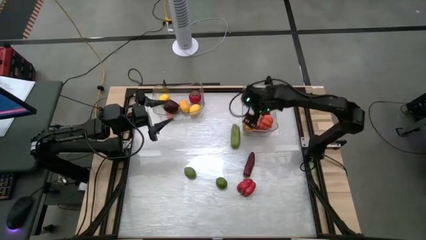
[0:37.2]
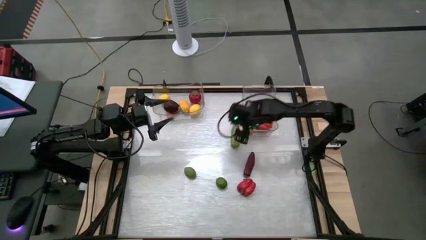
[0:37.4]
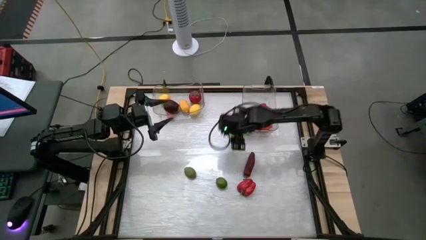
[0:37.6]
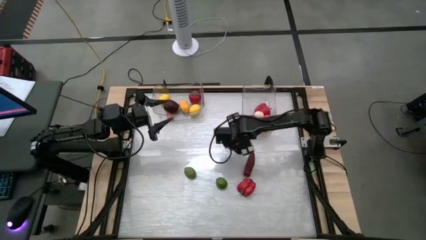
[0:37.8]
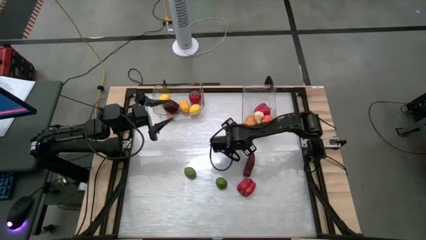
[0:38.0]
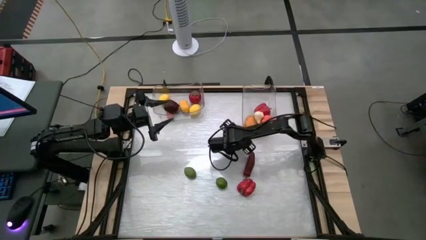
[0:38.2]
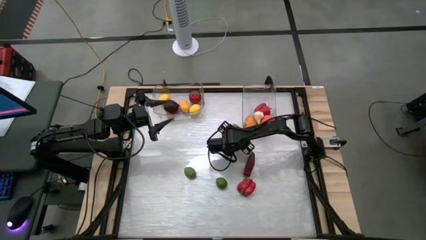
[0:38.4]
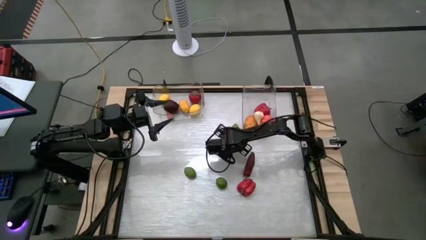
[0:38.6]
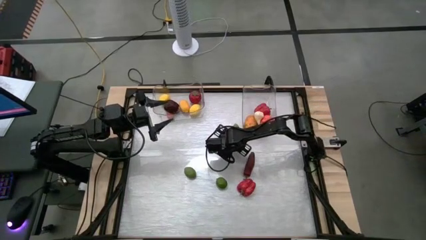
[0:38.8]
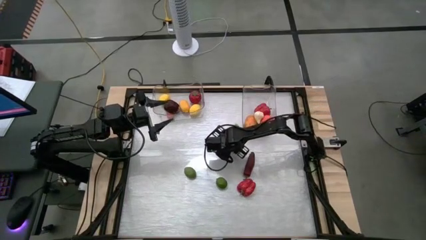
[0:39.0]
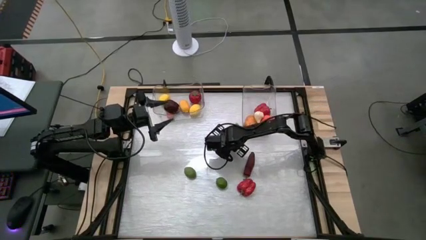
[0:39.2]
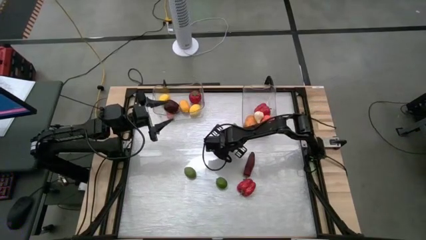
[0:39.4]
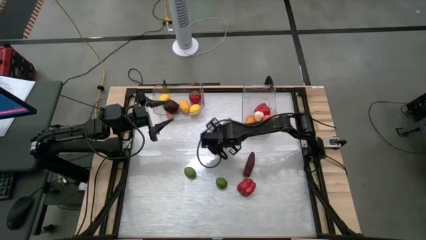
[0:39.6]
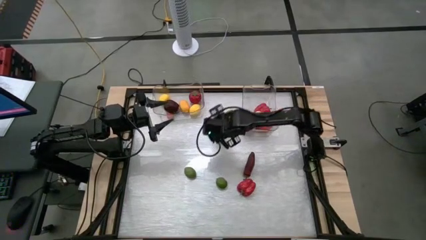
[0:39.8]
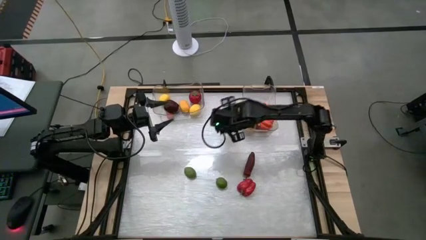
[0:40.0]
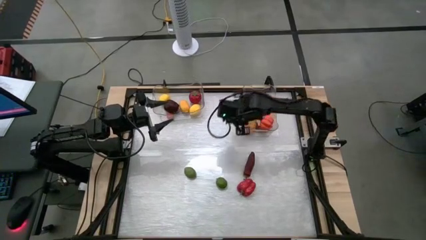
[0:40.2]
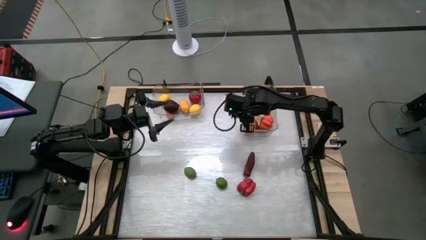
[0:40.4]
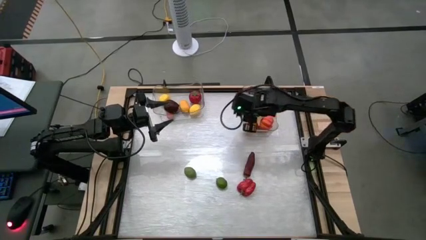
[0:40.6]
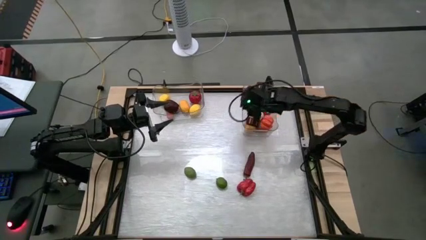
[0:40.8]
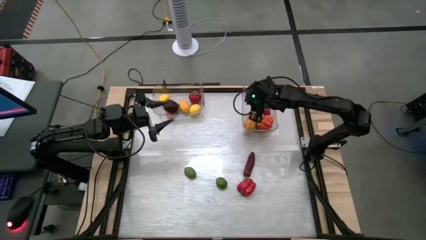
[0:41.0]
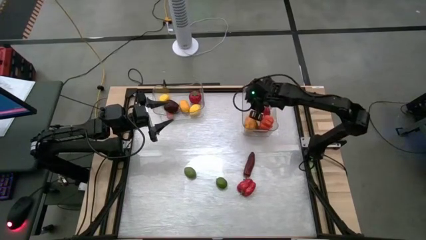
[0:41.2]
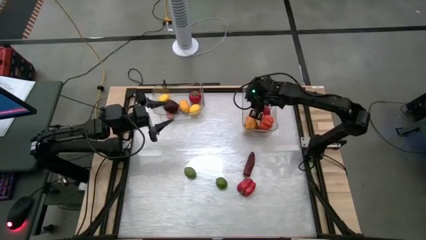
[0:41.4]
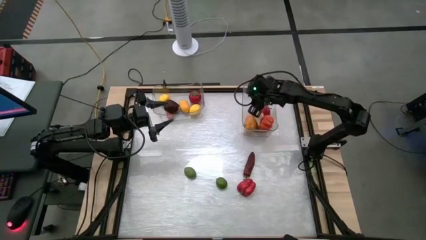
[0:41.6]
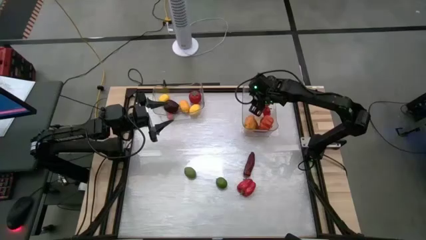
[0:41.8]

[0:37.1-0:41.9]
Task: Sort produce into baskets
Put the cucumber into the right transparent bin

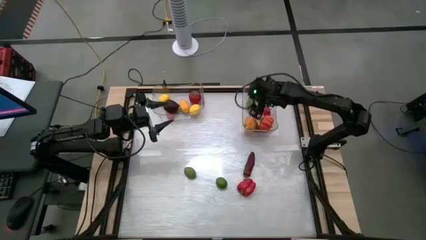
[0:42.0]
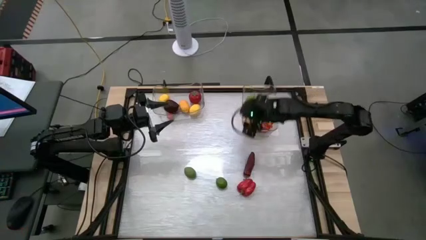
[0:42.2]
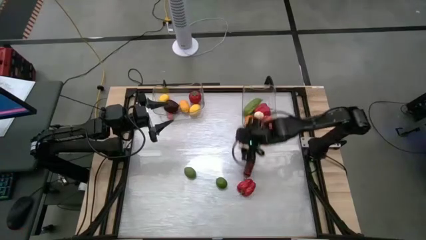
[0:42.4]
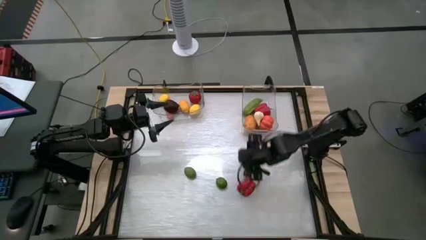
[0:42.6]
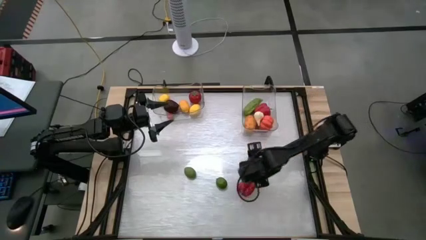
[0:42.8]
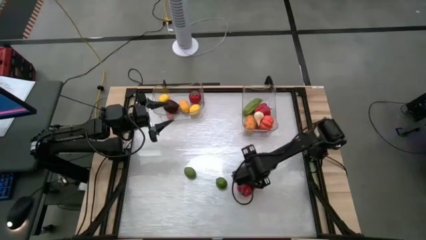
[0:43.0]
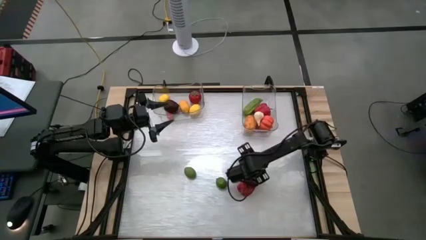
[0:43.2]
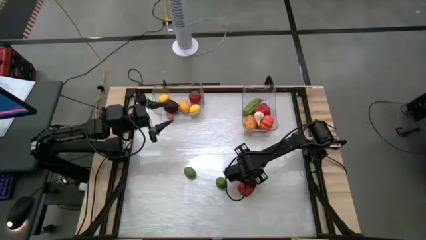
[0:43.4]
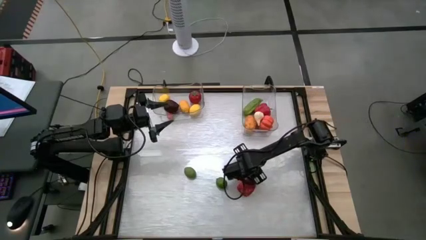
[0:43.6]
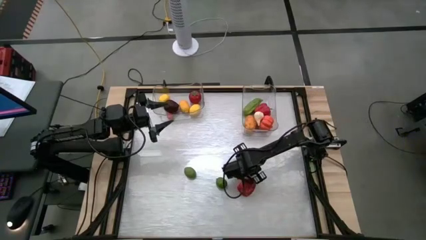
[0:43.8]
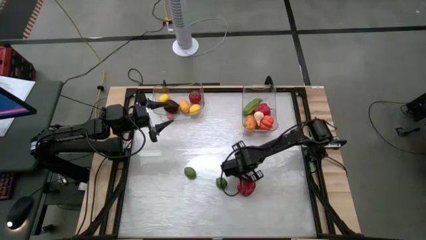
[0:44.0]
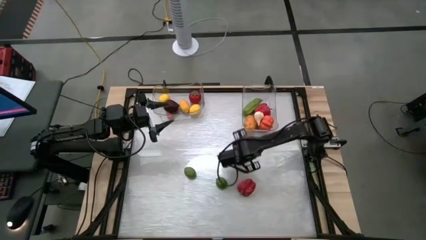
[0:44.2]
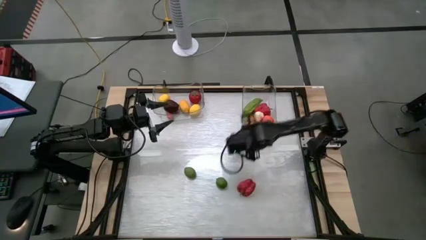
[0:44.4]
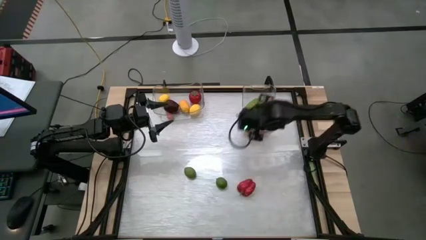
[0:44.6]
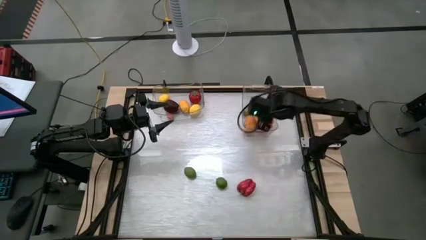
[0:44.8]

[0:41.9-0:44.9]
Put the pepper into the right transparent bin

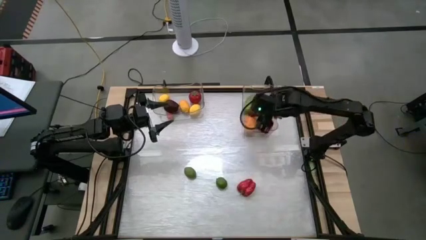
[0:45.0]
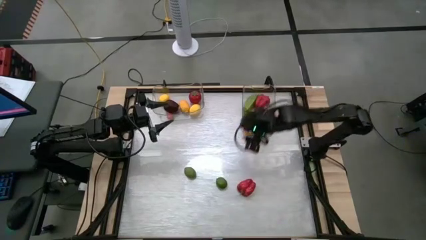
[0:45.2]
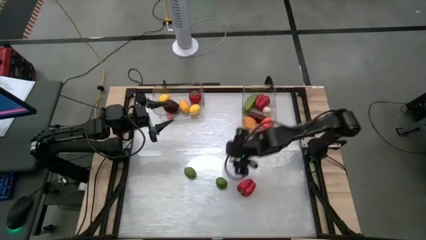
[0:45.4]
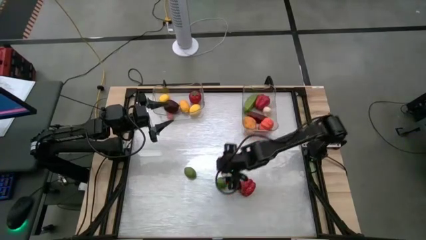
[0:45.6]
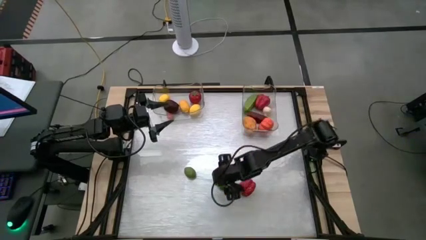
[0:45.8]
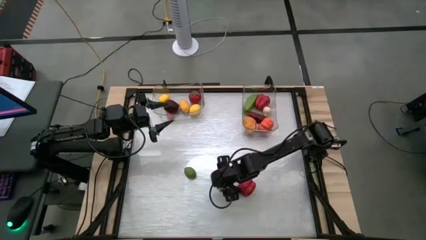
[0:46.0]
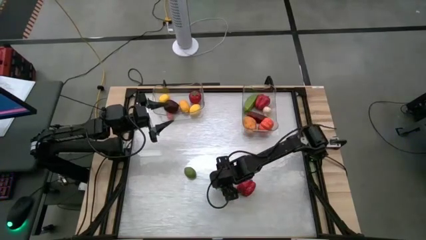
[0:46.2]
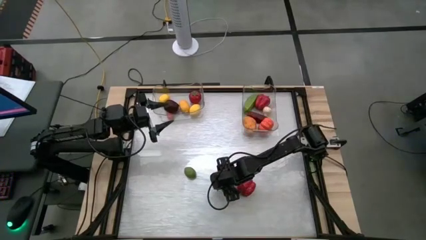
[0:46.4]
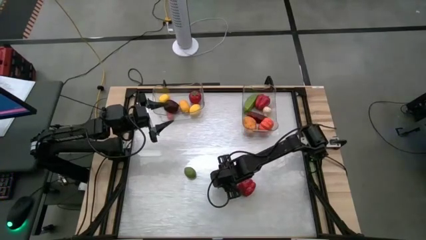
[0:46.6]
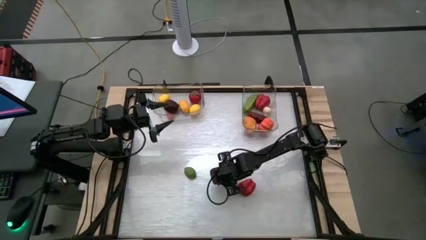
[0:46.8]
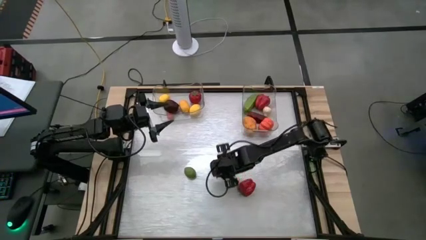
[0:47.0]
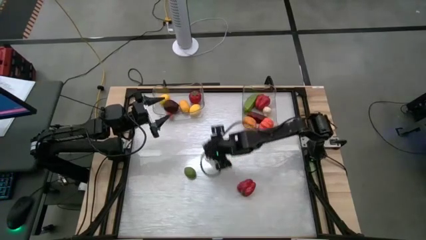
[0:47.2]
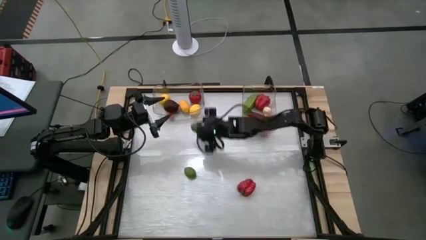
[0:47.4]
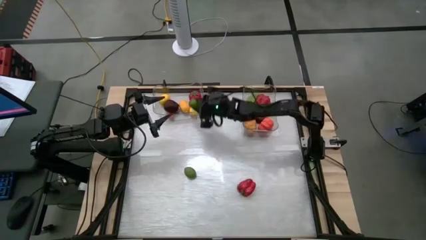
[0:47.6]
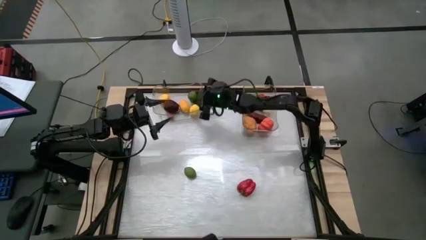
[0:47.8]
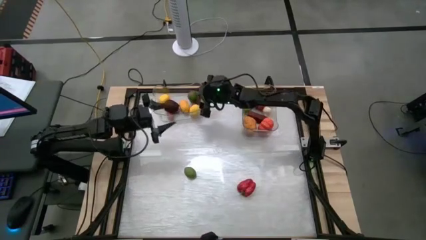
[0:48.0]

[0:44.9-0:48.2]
Put the right lime into the left transparent bin

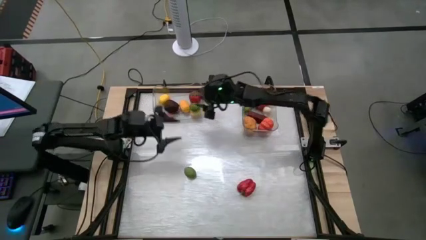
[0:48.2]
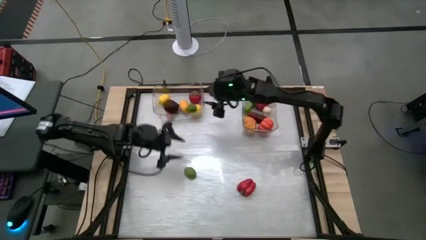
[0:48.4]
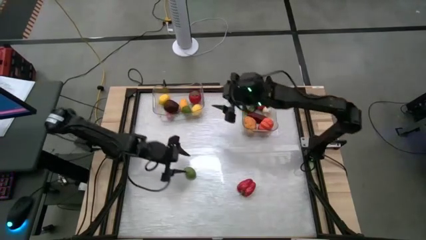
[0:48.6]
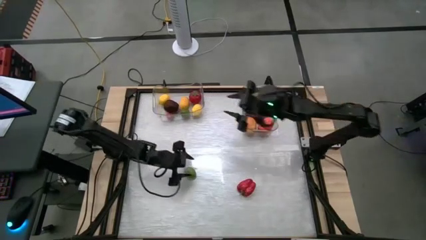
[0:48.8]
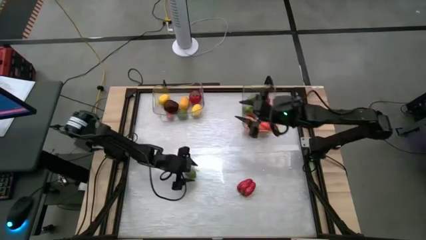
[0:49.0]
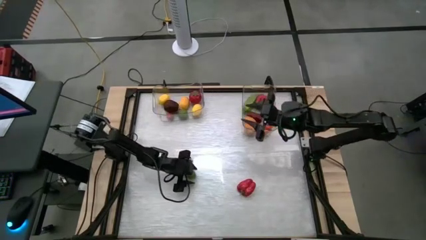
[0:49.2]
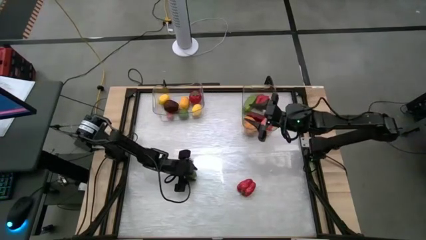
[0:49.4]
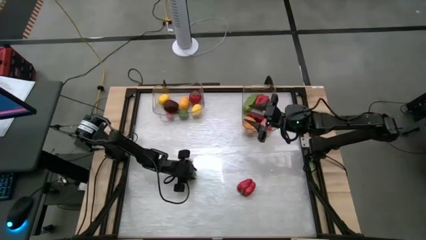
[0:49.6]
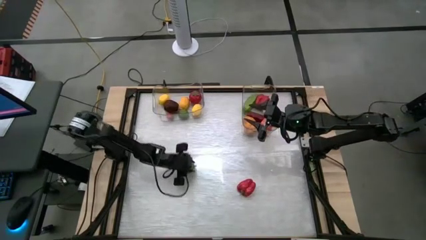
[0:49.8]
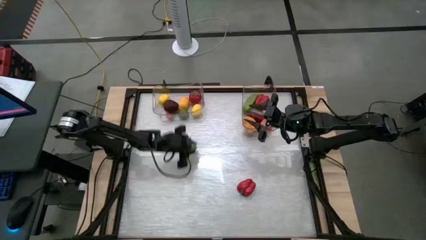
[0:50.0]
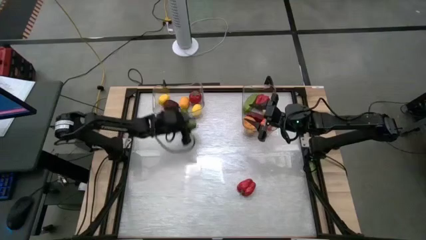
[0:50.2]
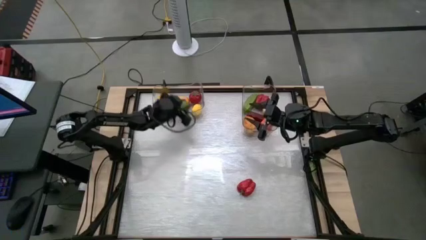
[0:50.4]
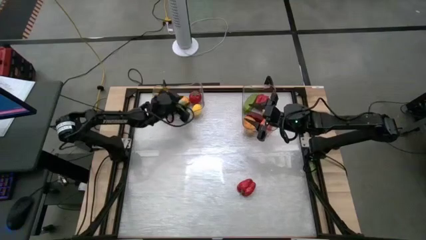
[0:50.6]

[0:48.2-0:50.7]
Put the lime into the left transparent bin

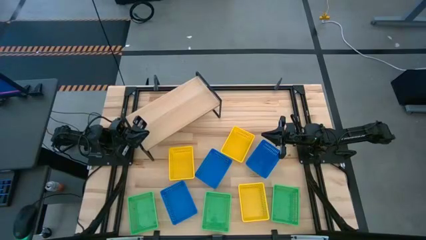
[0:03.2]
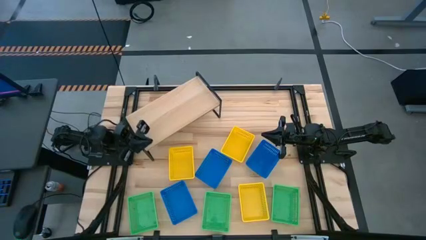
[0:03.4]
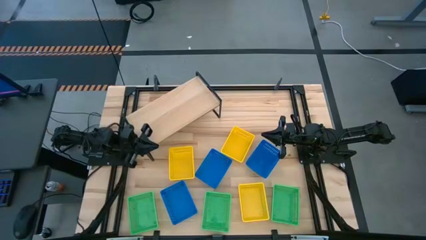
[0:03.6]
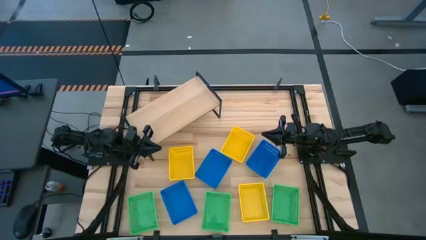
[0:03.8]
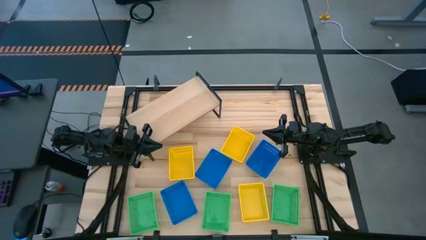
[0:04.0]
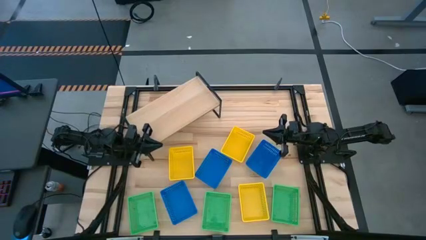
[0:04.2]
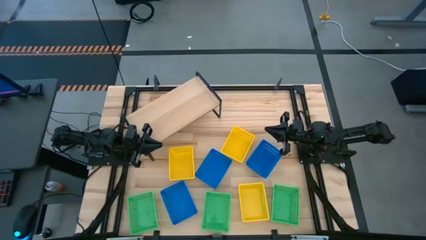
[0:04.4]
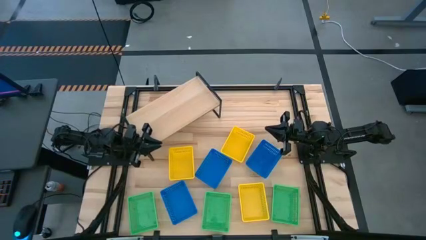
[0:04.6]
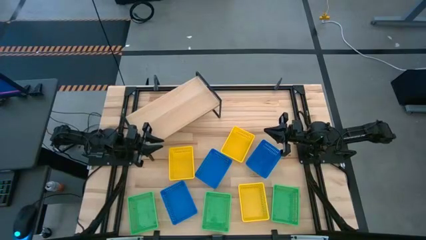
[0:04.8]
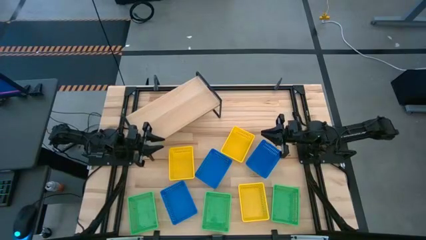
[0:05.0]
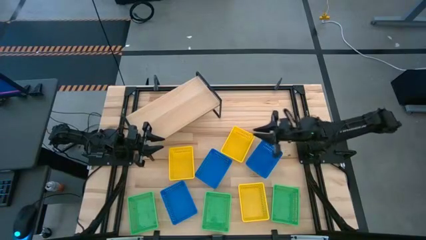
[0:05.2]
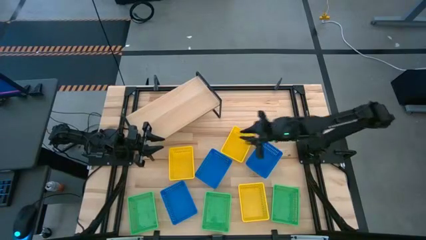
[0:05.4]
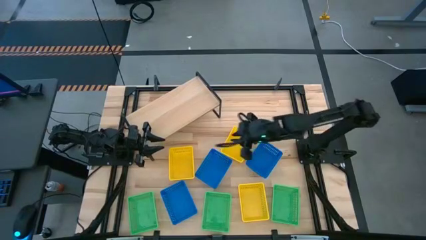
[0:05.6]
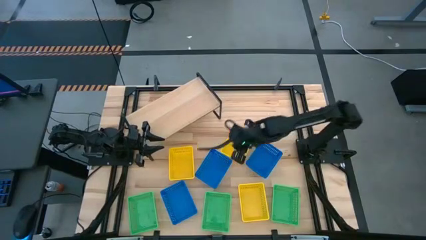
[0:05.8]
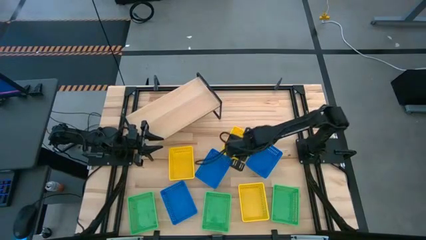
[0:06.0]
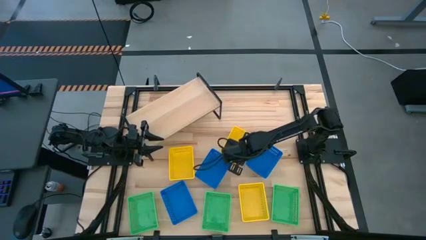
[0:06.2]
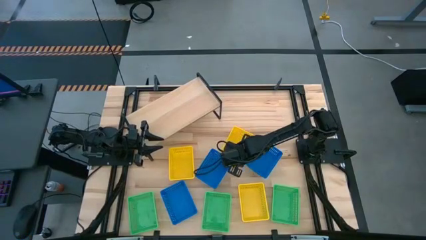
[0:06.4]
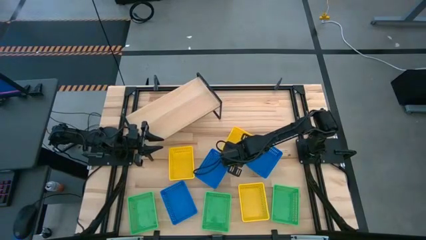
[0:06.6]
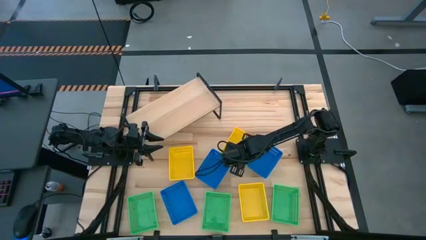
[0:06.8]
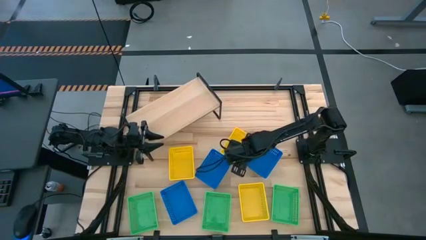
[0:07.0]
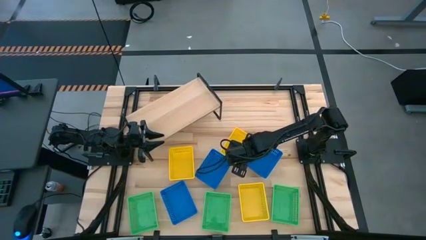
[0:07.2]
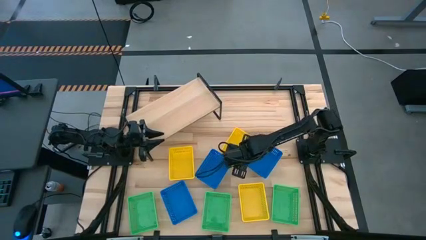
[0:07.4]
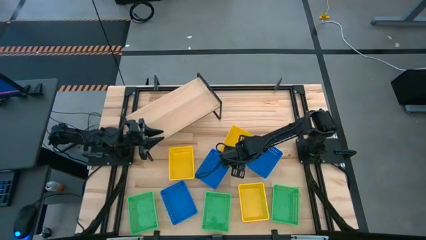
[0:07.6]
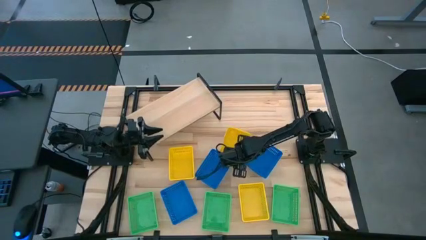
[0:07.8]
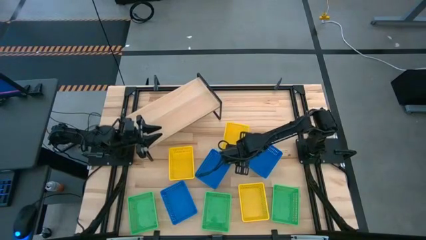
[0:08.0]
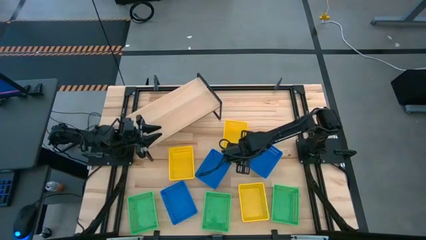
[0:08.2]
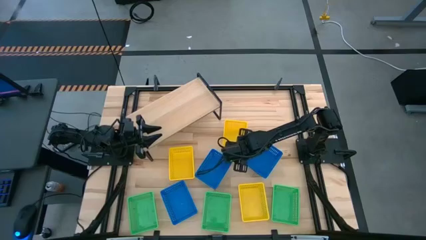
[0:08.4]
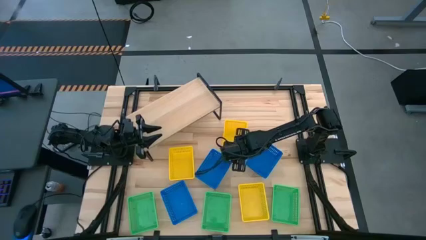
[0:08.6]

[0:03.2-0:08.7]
Task: Stack baskets on shelf by color
Put the top right yellow basket on the shelf
